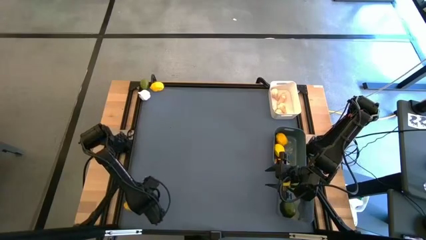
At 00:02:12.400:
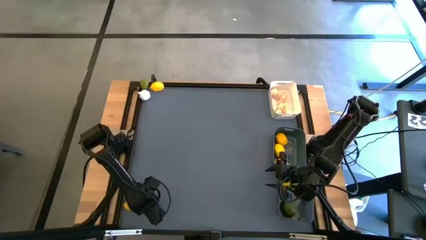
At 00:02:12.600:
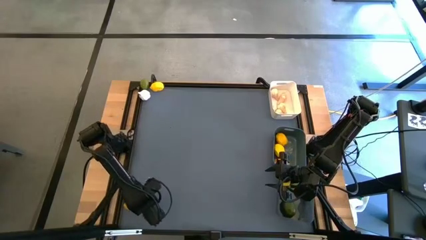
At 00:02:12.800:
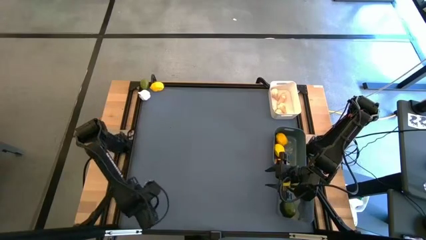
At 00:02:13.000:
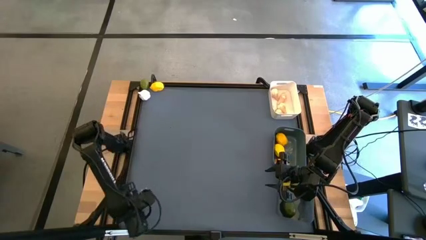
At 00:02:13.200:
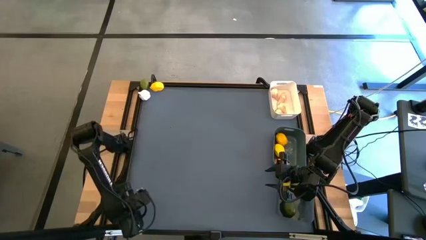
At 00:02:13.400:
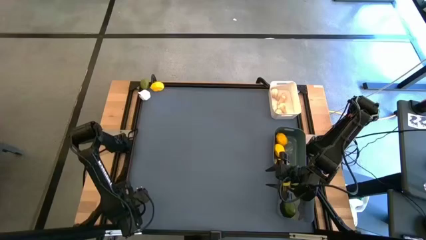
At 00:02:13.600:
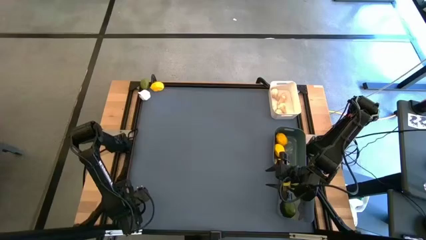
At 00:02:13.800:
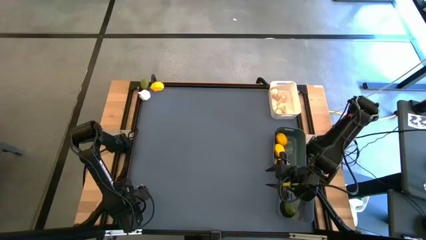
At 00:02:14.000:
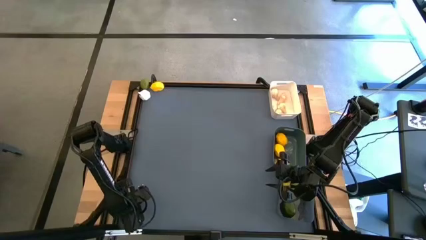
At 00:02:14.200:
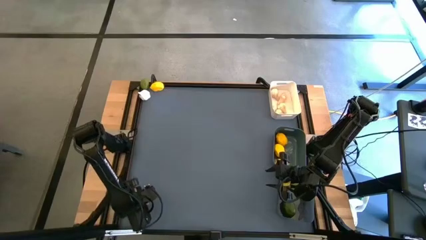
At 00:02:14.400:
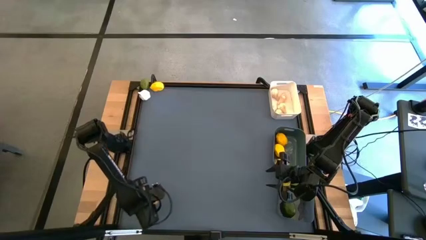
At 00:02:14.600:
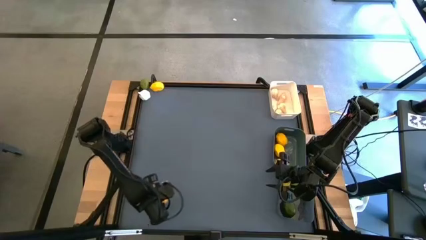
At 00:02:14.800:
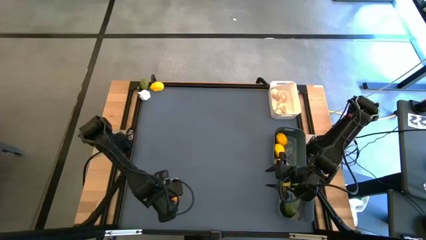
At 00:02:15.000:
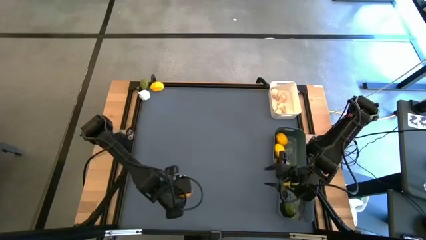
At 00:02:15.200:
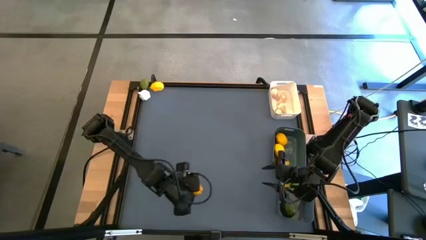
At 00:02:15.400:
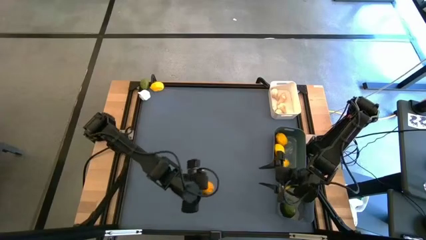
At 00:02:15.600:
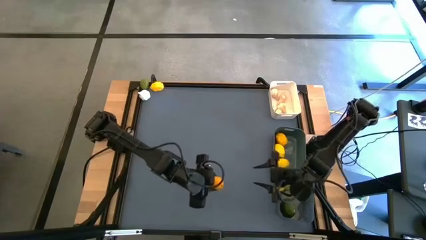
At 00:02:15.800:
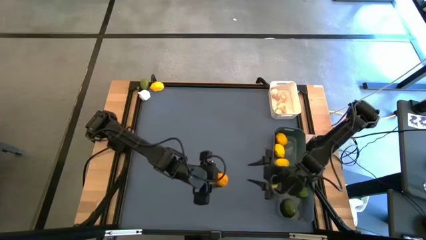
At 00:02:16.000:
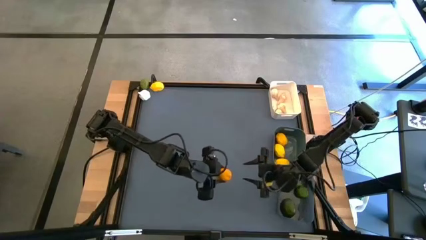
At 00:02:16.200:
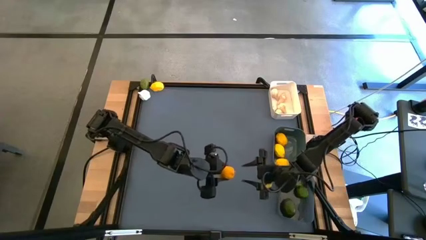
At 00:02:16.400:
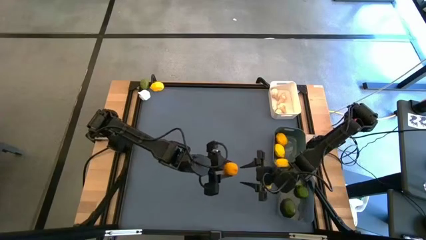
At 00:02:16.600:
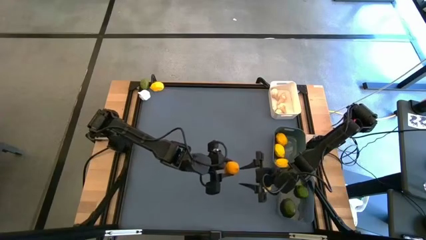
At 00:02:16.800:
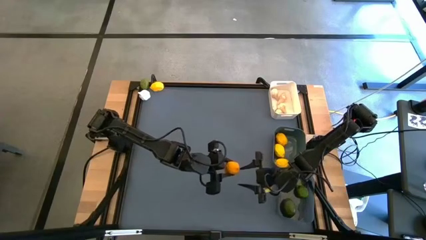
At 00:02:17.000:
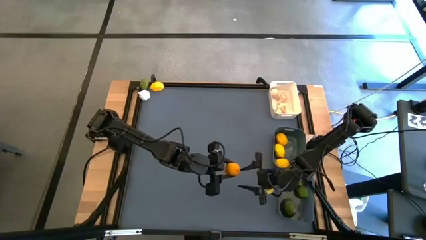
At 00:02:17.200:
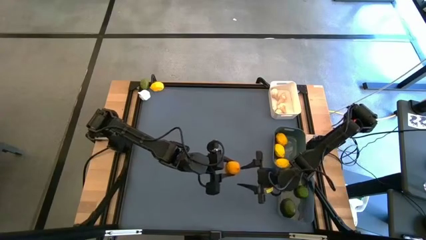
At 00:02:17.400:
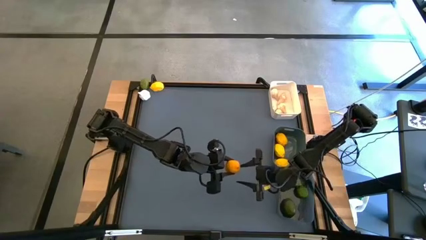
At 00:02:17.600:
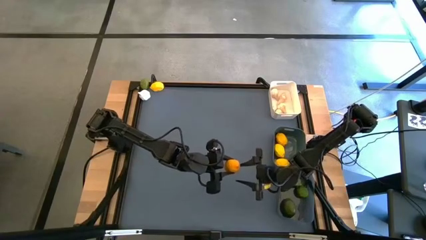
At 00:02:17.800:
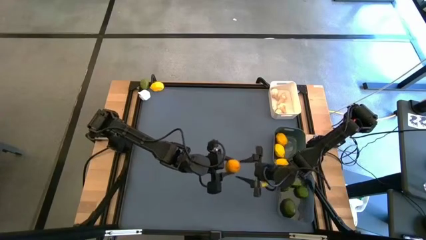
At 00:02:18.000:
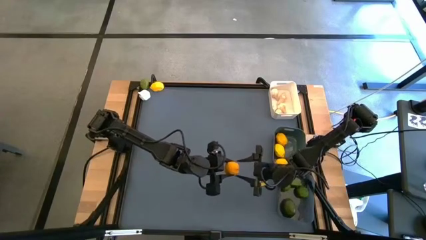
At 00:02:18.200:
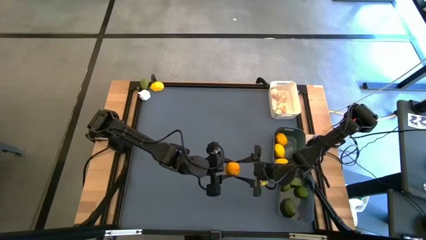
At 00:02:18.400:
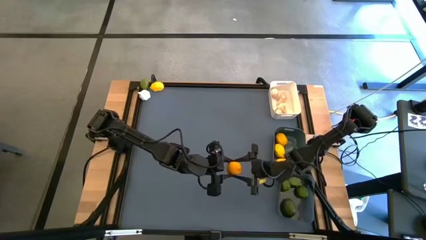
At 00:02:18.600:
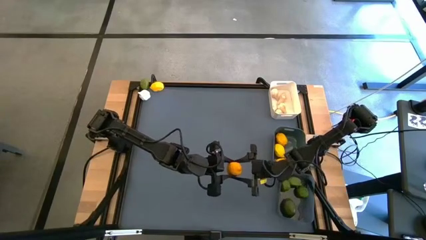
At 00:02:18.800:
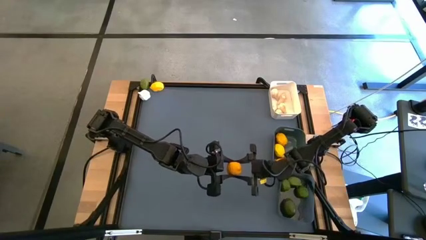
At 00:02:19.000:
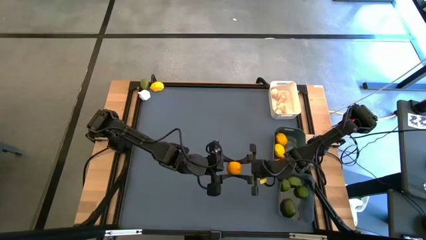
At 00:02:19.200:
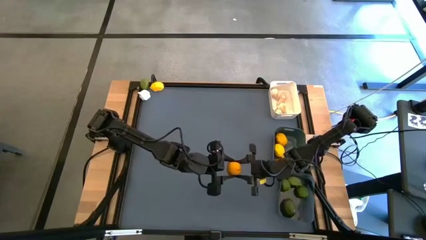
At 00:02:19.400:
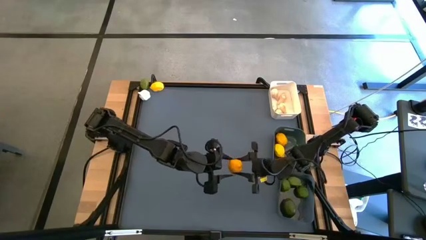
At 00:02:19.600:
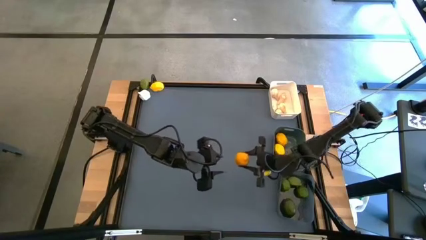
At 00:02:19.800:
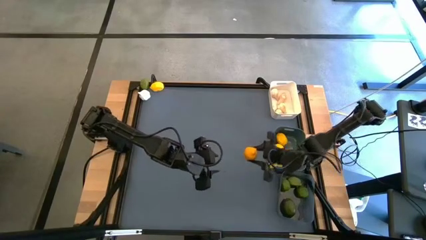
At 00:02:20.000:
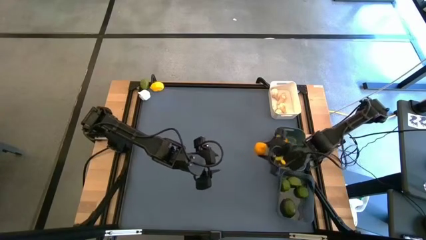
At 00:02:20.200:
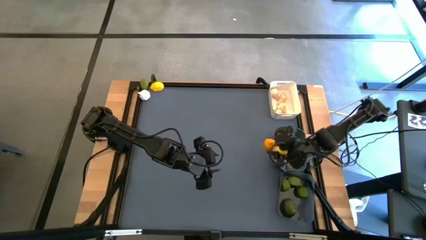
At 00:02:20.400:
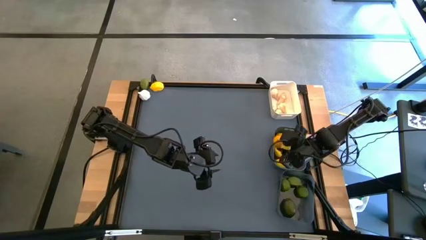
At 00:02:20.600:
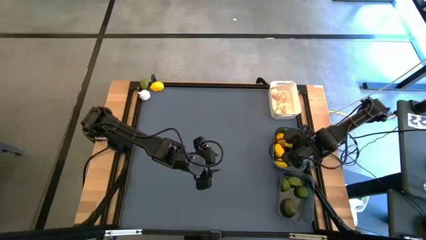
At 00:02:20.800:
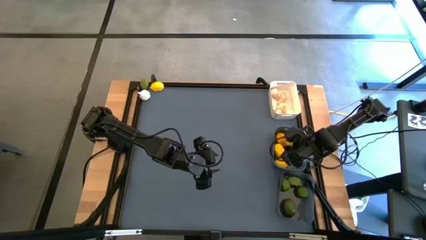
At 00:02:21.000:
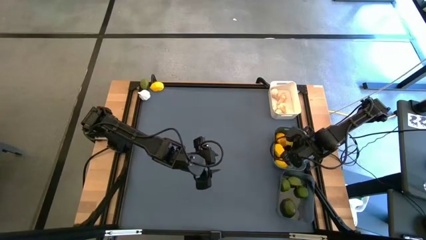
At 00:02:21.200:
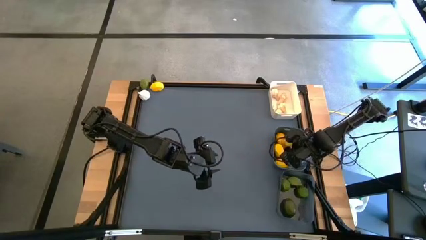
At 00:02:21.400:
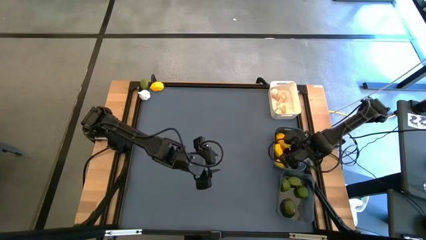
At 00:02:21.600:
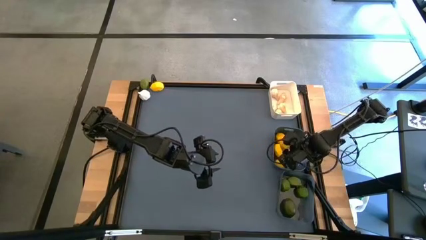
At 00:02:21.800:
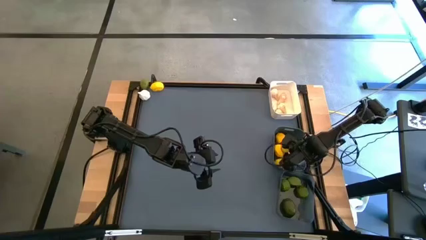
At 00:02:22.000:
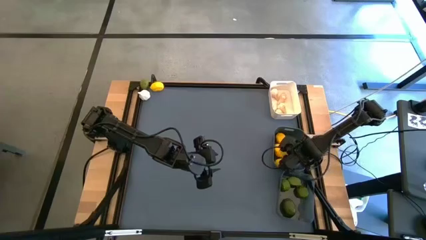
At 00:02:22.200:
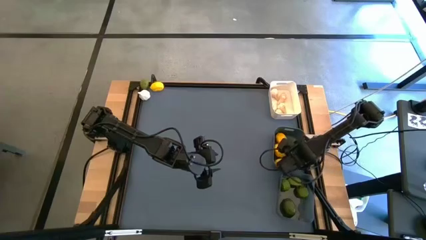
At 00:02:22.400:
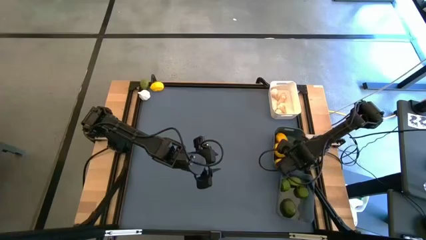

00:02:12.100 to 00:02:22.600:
Task: Sort produce into baskets
Put the yellow lemon into the gray bin

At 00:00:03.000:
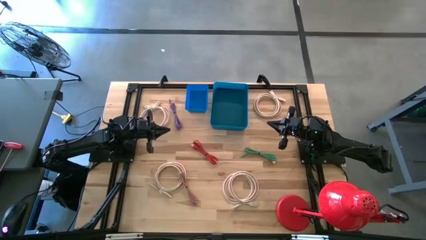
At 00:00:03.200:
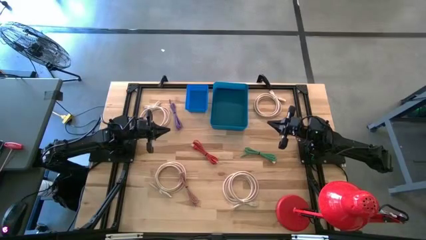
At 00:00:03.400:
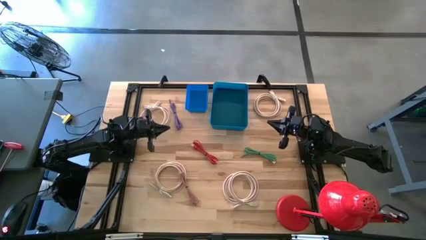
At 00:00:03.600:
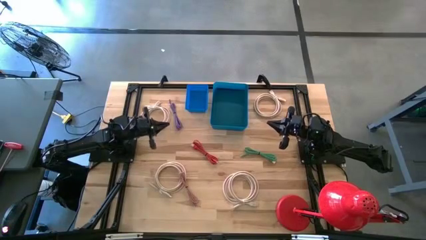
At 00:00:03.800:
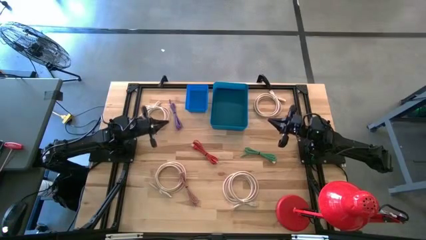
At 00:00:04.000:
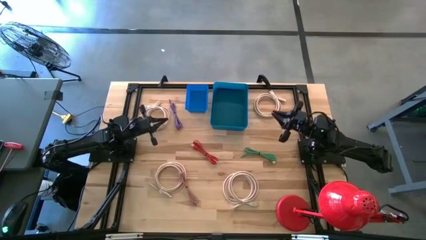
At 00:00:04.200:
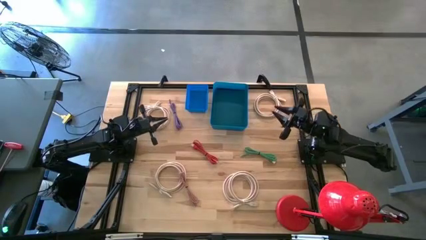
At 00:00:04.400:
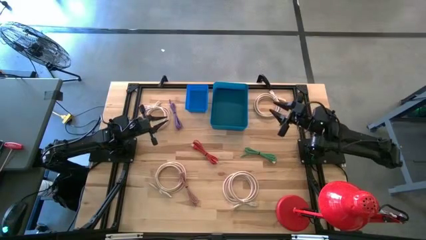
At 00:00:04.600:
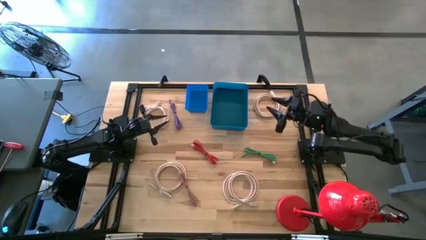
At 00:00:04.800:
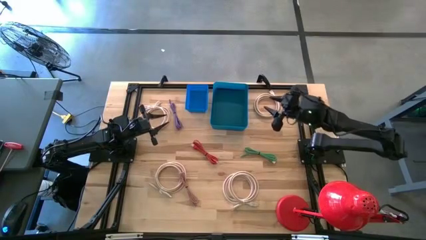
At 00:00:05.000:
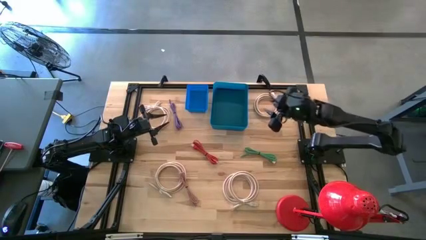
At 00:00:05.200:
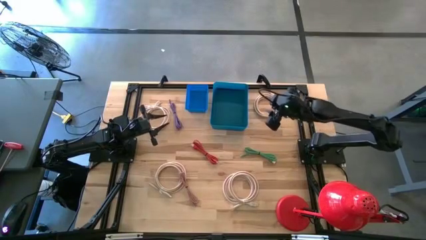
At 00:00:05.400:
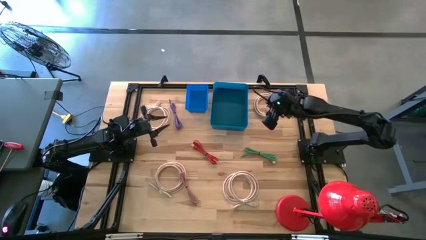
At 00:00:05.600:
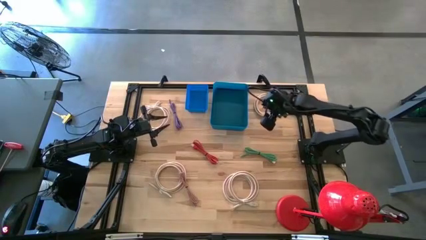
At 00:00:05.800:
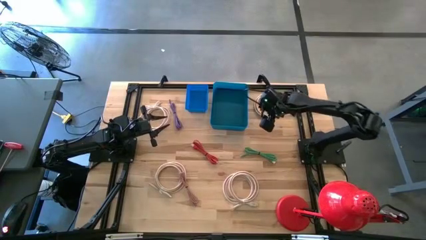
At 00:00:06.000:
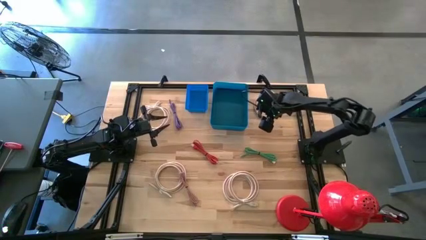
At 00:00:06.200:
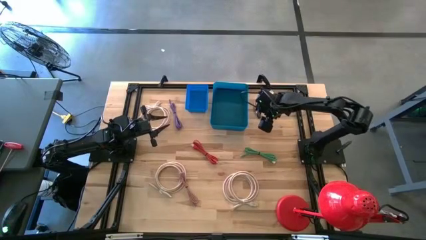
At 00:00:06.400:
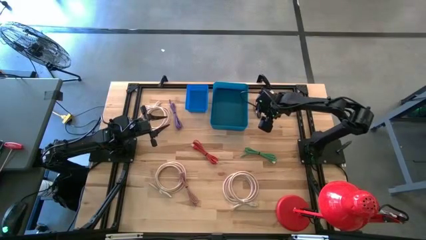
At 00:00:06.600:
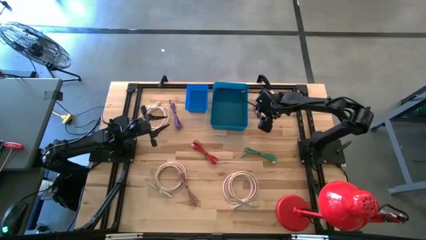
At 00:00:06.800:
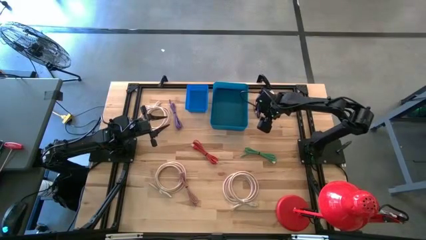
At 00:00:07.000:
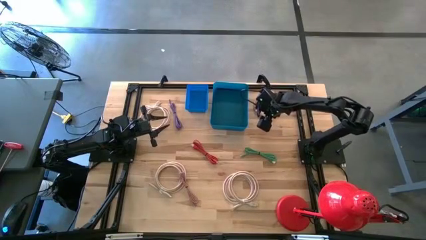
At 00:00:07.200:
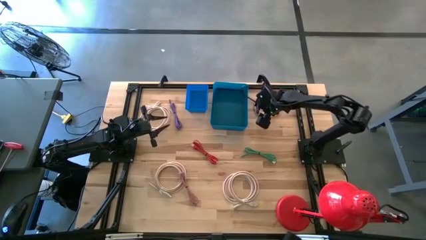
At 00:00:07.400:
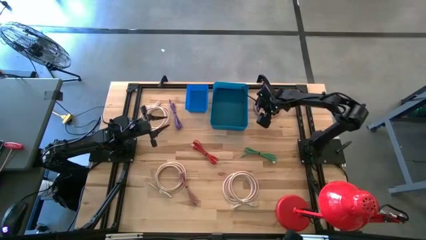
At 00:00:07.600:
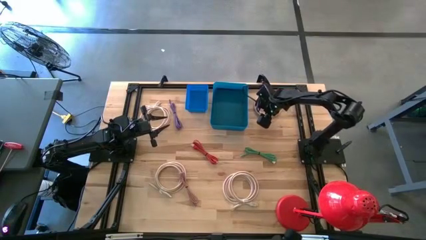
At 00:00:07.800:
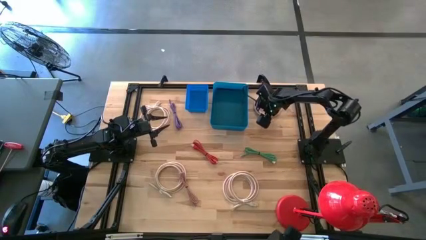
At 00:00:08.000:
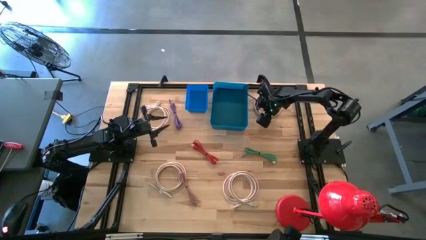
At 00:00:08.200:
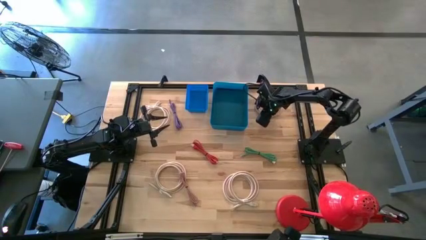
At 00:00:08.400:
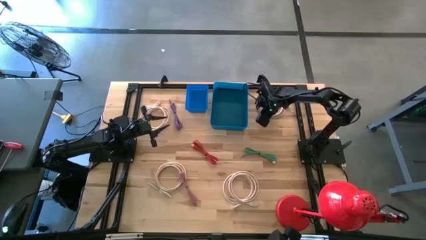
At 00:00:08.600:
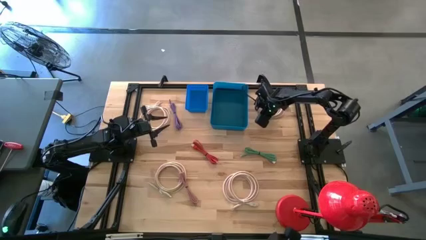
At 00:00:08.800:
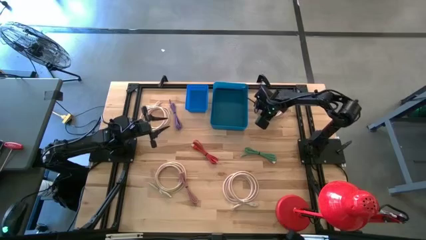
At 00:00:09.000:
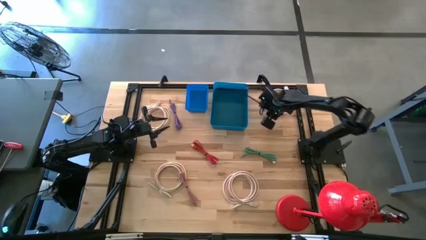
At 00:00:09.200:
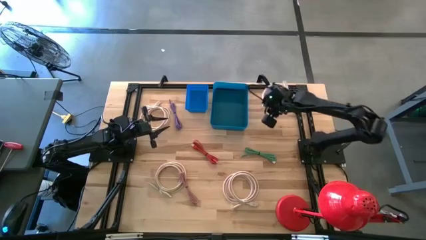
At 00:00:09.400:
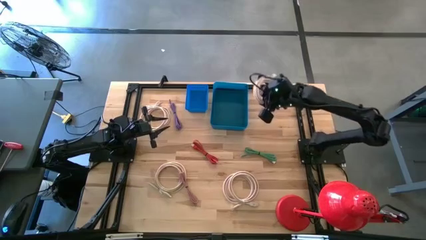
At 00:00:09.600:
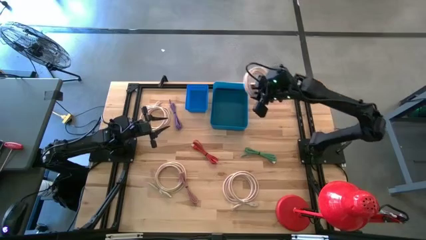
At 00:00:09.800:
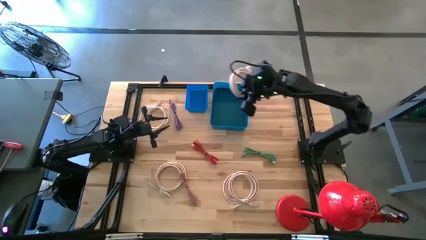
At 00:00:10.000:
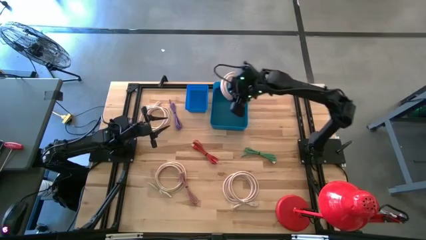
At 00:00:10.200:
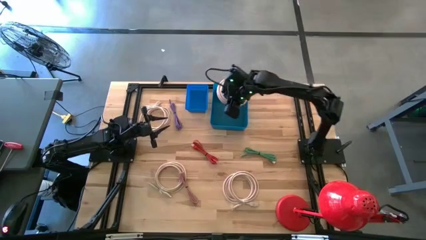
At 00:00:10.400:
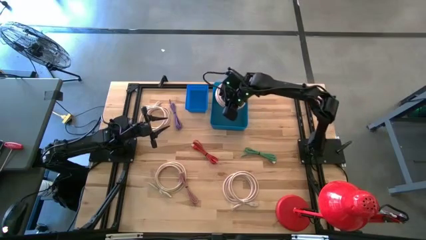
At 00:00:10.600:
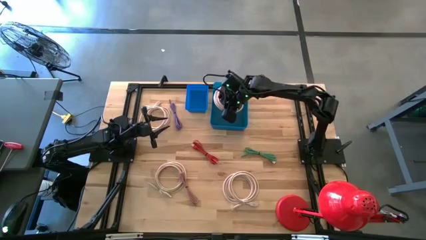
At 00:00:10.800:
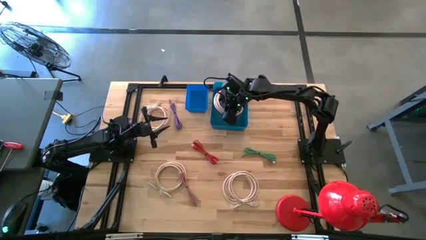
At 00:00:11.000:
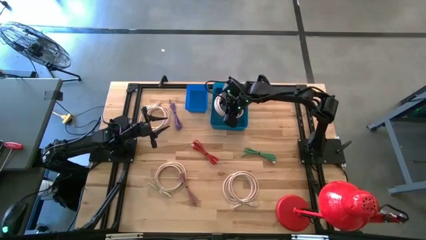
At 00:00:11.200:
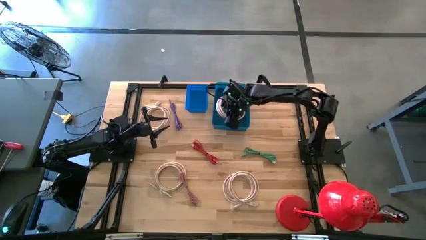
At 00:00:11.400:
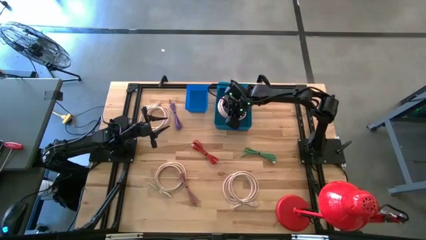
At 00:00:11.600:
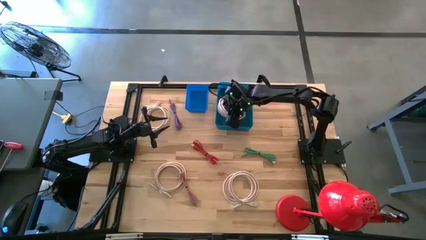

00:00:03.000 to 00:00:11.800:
Task: Pick & Place USB Port
Put the white HDMI cable into the dark blue bin
